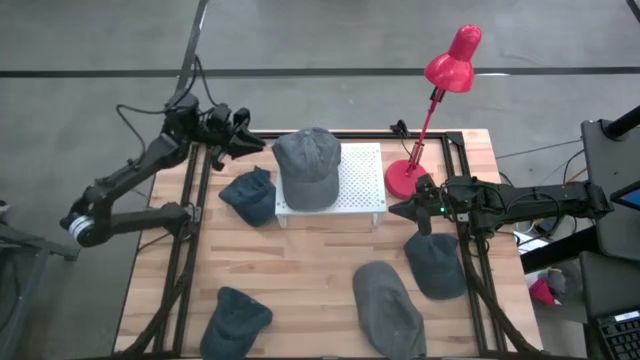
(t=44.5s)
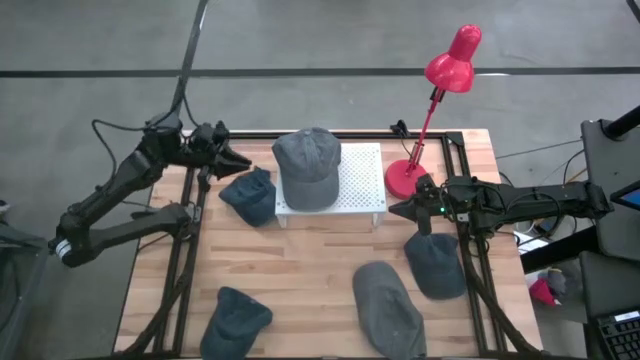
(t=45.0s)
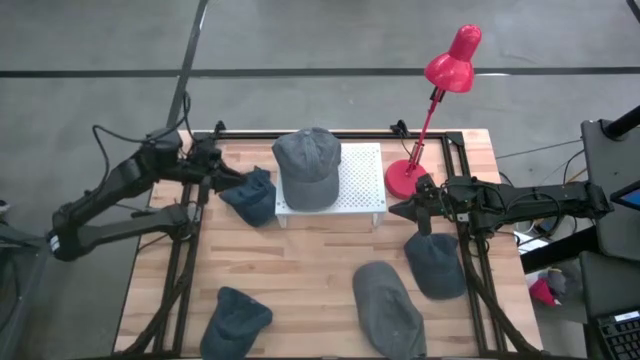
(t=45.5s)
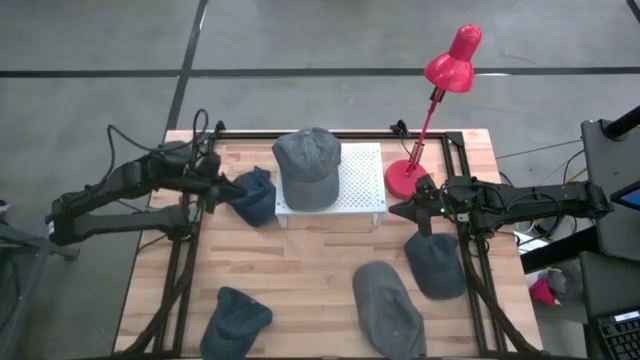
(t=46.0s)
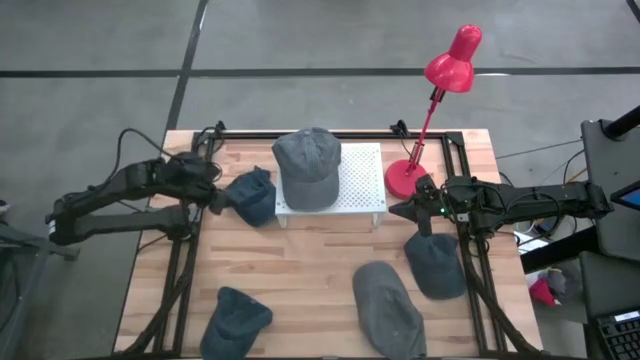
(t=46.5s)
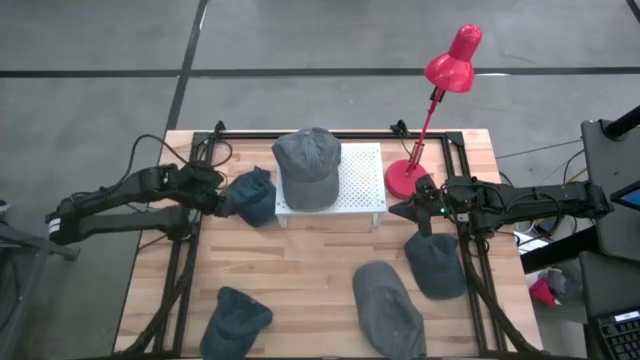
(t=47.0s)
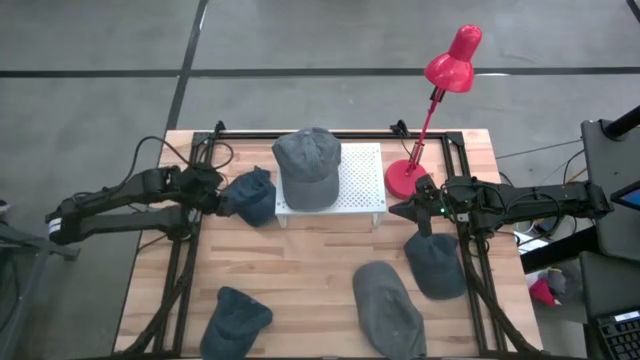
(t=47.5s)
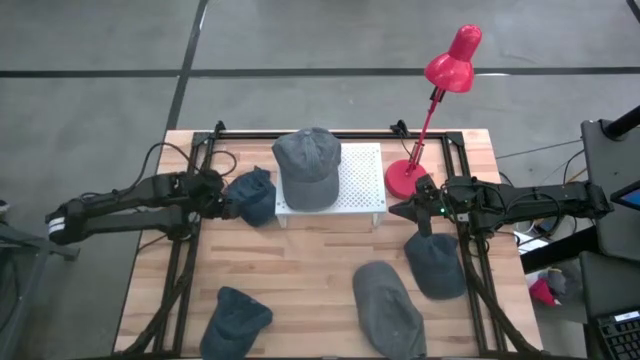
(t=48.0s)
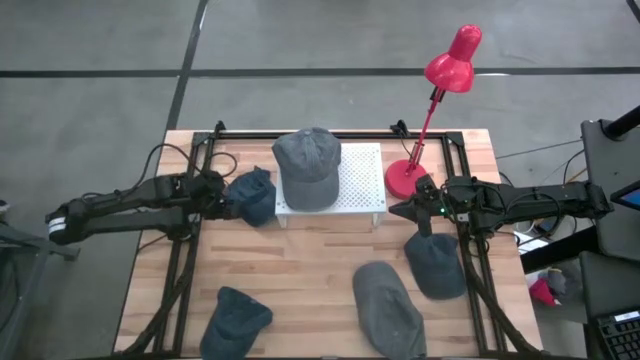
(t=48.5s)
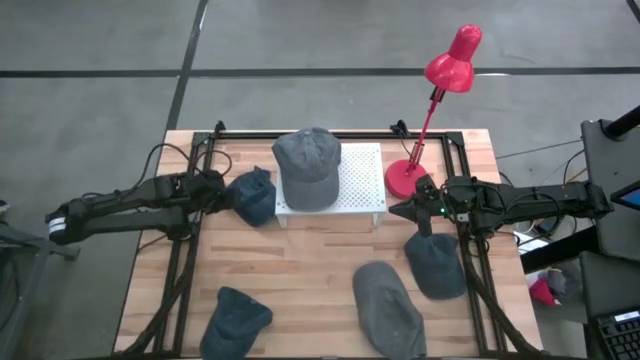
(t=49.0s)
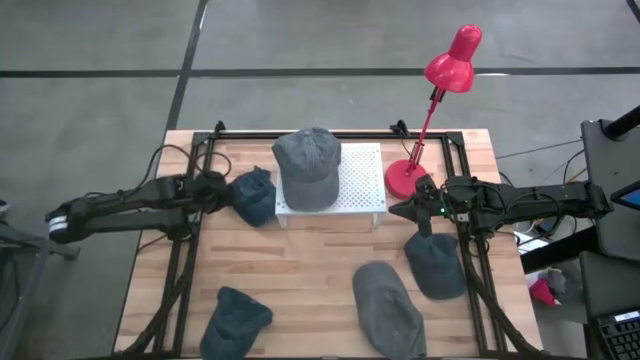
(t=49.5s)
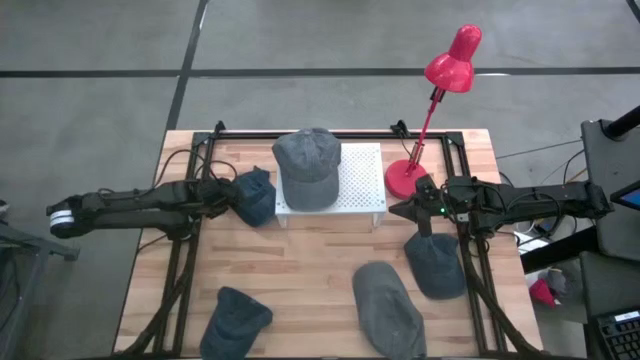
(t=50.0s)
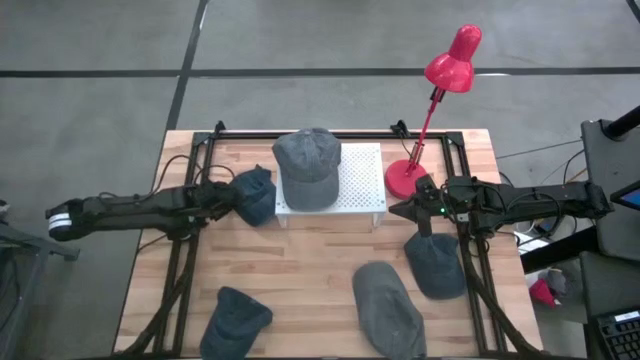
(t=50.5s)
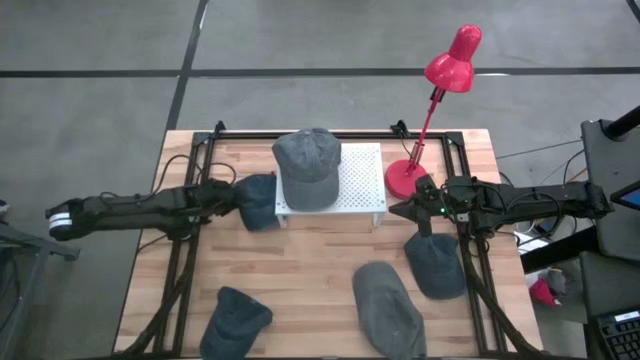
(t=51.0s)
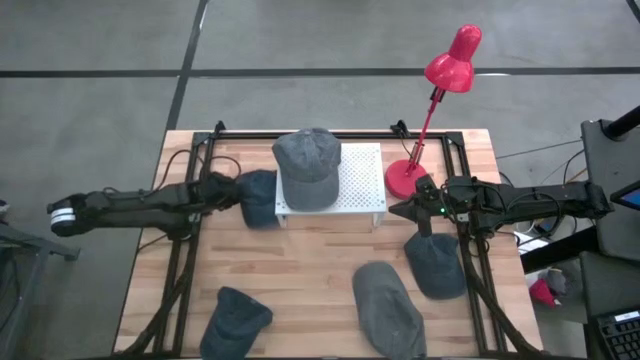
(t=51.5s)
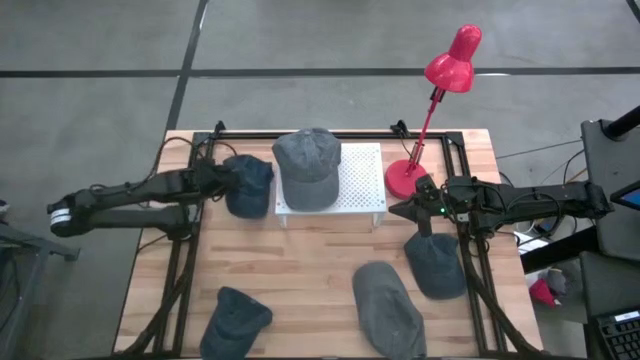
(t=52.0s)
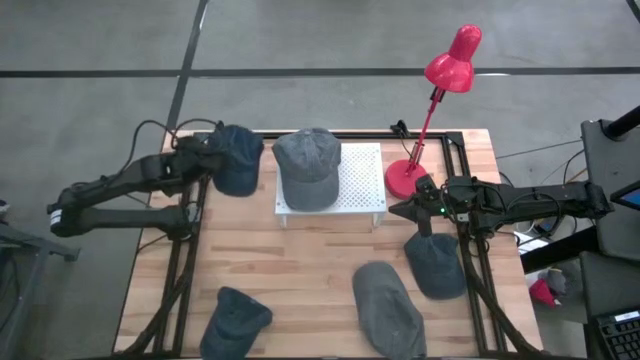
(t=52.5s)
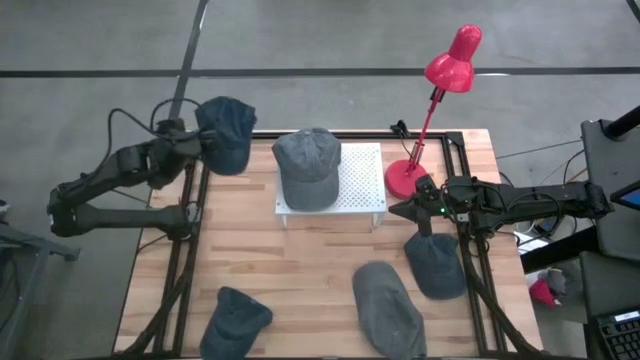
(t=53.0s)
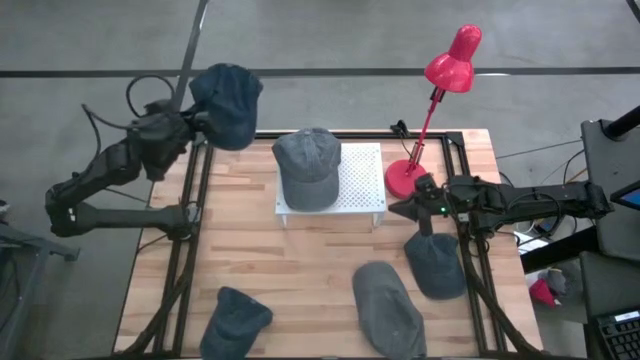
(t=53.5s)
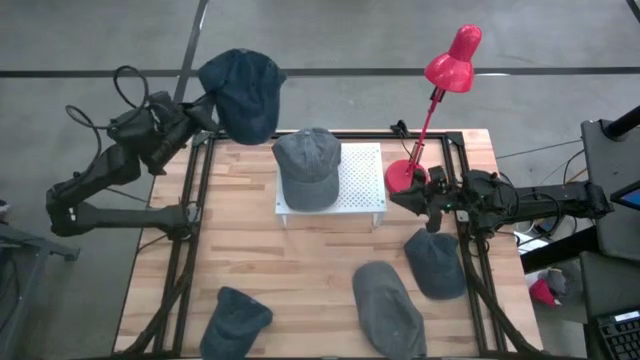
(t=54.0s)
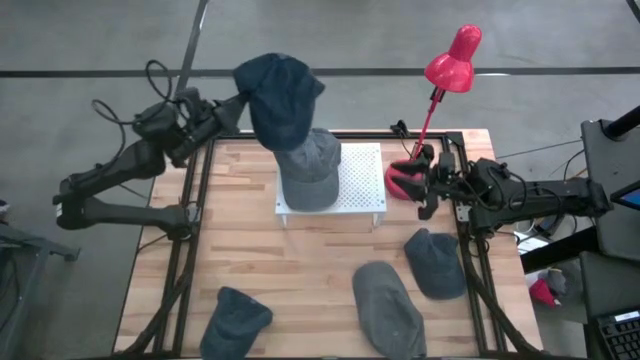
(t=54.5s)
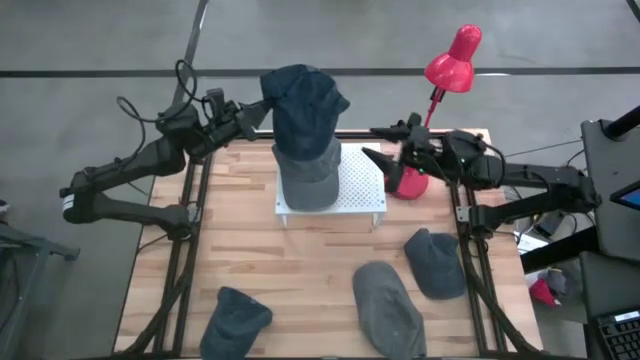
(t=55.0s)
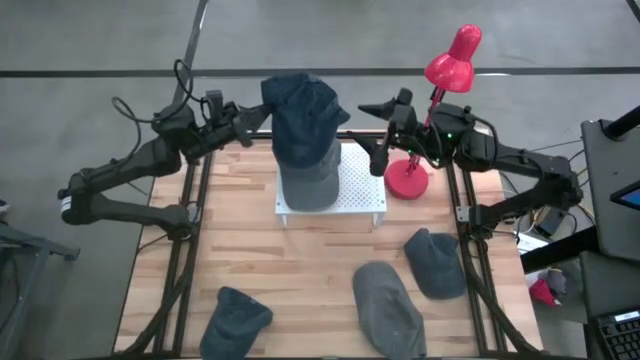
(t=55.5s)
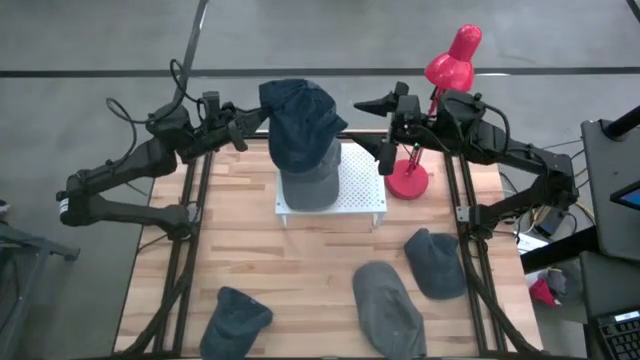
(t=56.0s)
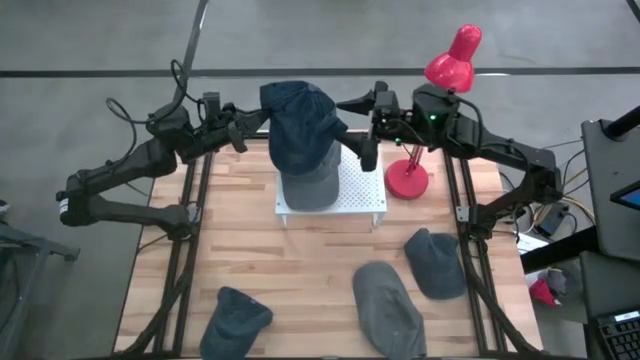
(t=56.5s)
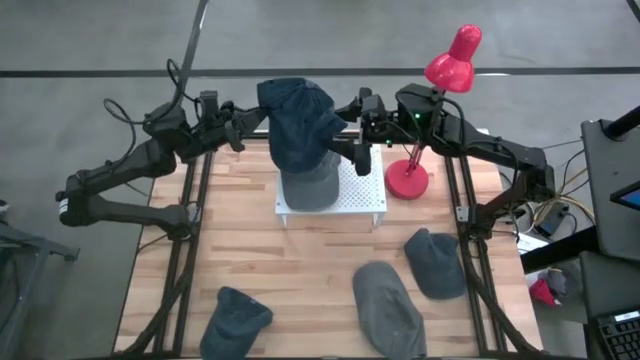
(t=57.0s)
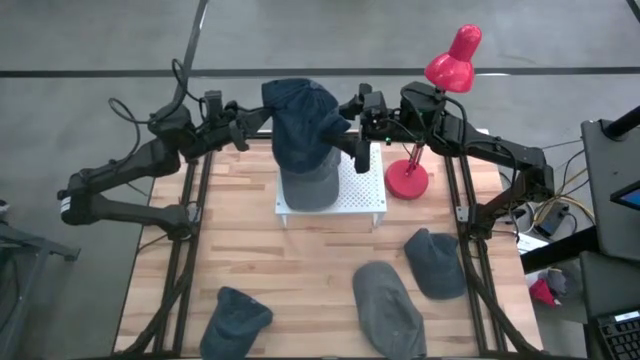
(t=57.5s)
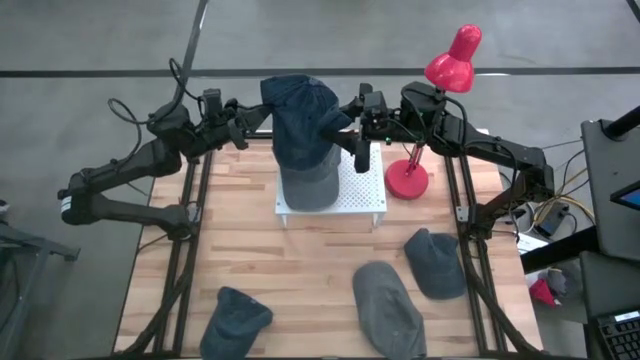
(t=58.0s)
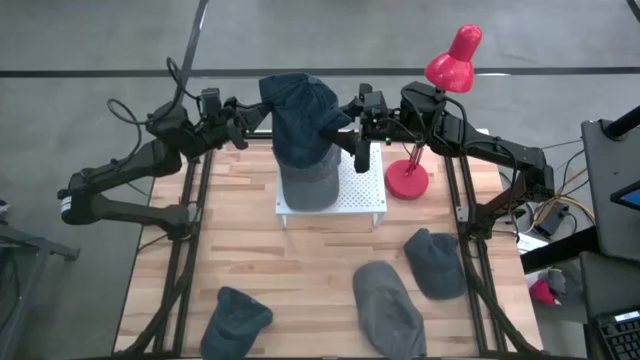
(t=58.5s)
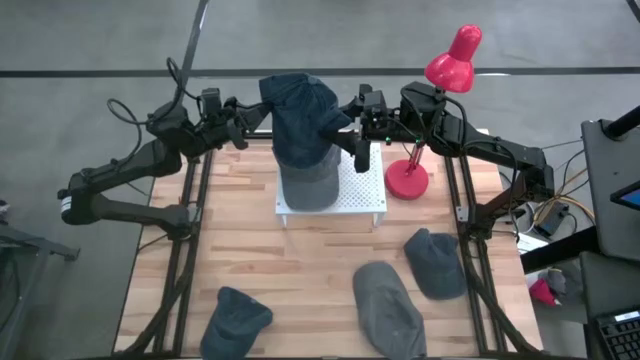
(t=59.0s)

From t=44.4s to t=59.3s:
Task: Pick & Place hat
Put the top left blue cap on the shelf

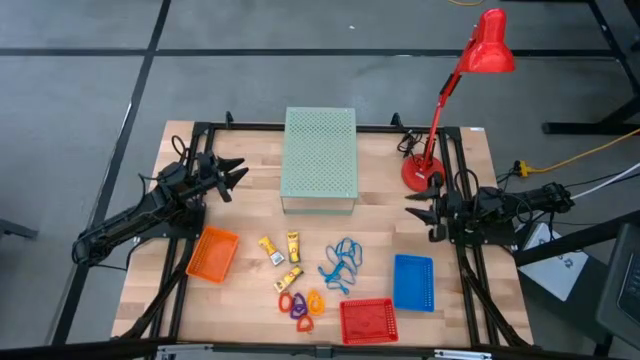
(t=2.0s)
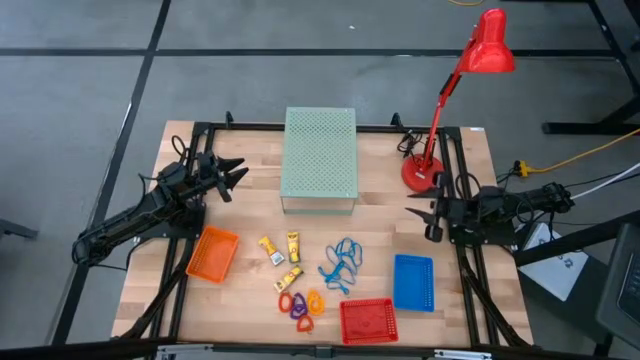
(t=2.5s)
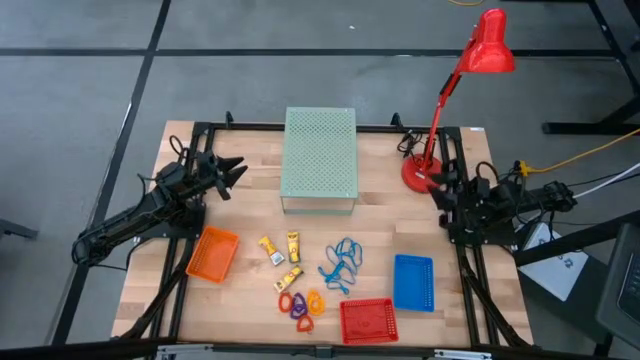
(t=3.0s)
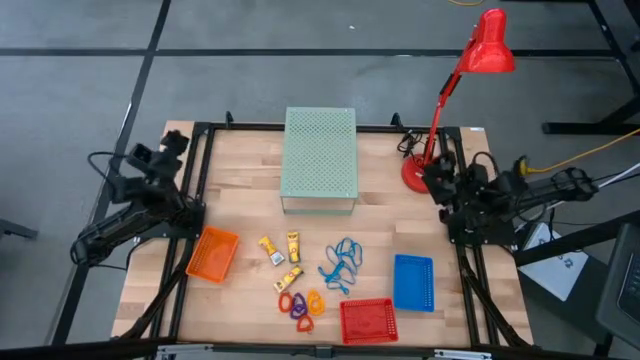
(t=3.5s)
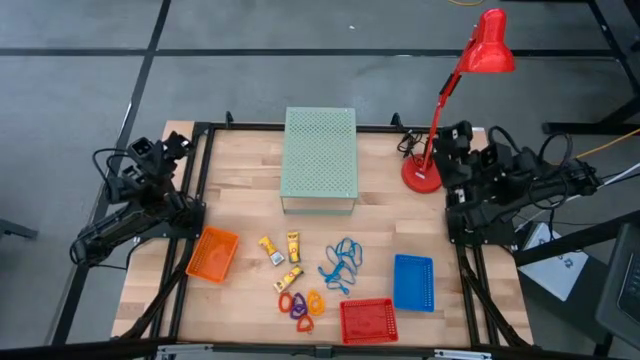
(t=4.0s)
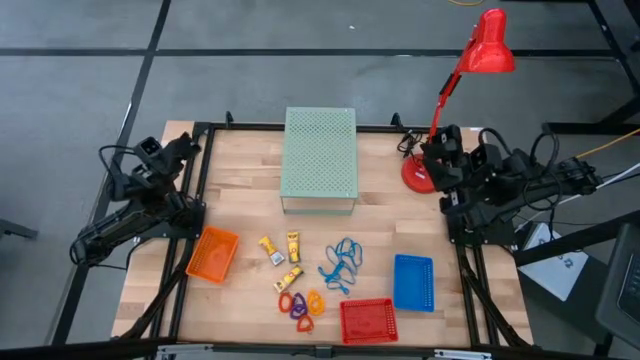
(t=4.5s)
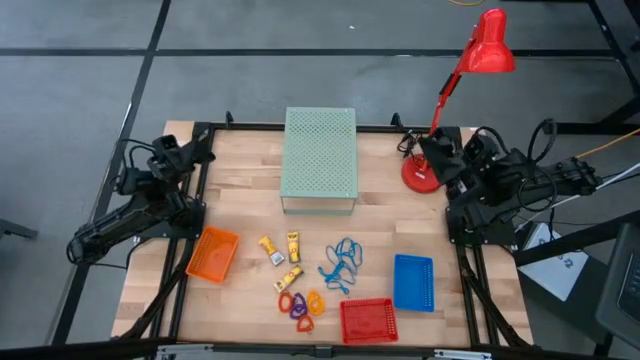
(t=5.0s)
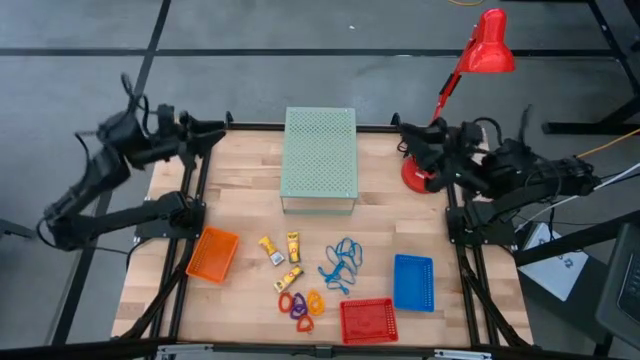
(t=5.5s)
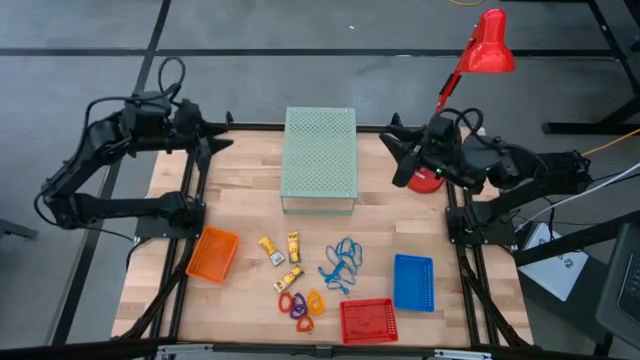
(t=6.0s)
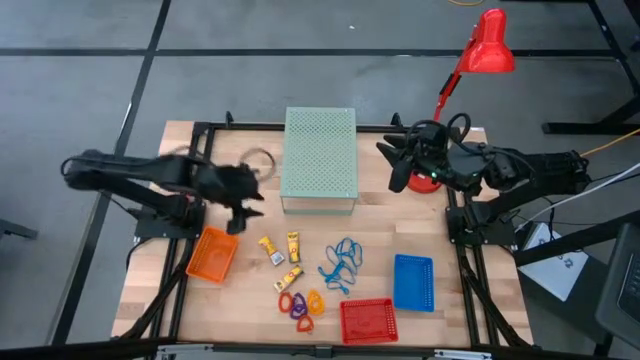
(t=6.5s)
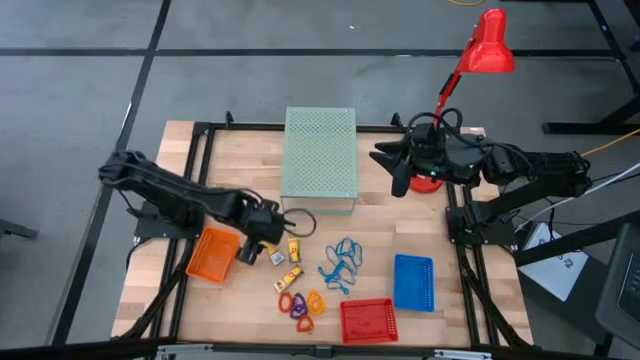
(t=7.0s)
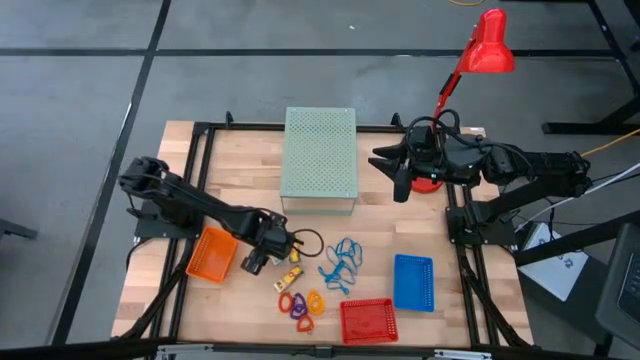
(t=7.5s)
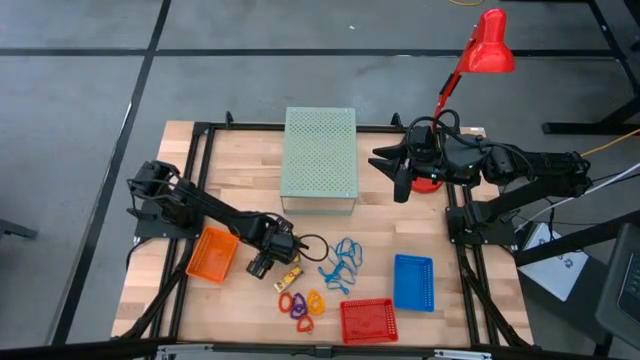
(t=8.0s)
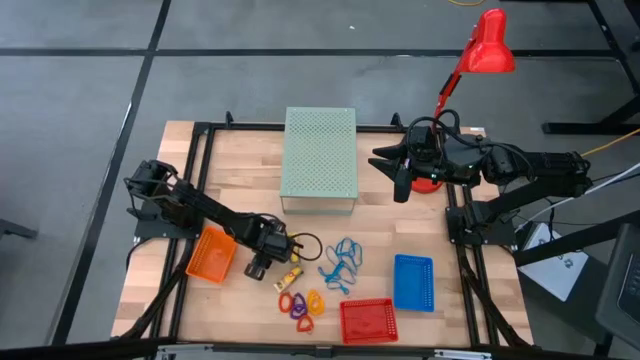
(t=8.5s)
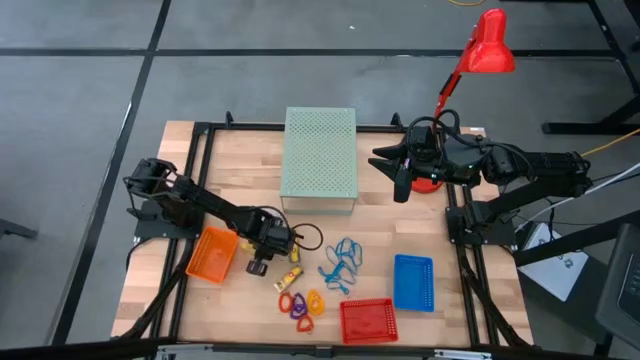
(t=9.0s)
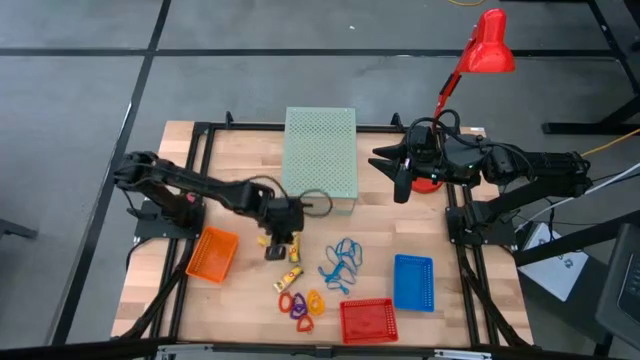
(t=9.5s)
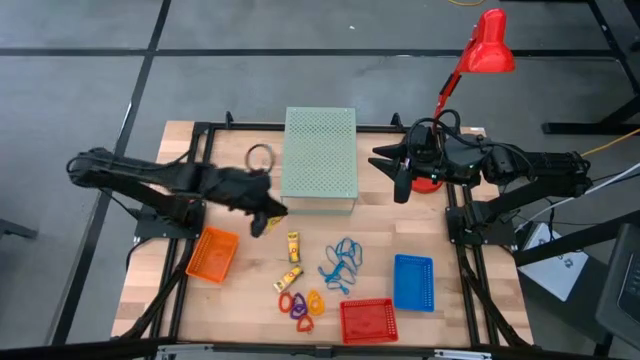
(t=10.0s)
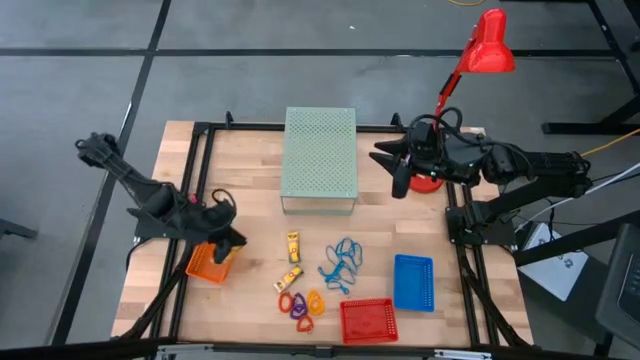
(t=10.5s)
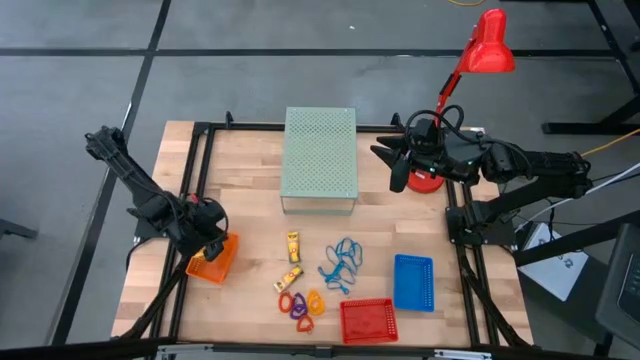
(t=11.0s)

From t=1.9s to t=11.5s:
Task: Pick & Place Office Desk Supplies
Put the yellow crayon box into the orange bin
